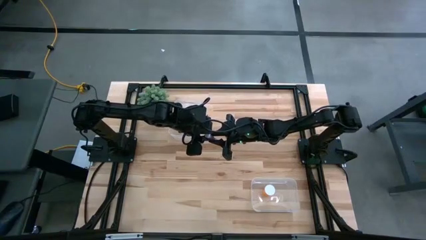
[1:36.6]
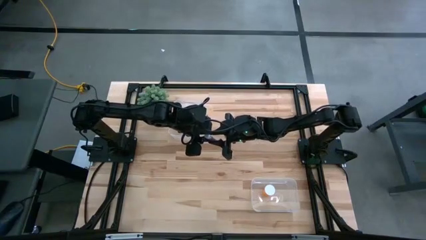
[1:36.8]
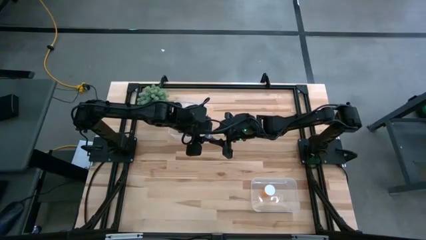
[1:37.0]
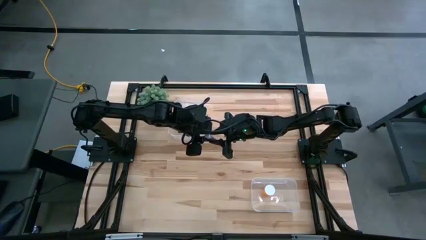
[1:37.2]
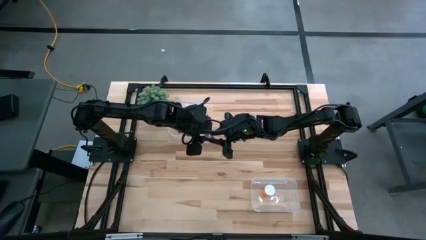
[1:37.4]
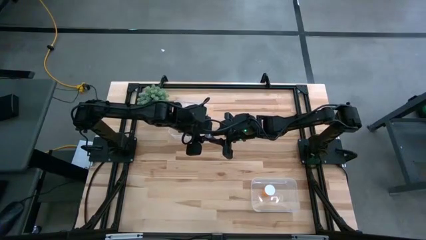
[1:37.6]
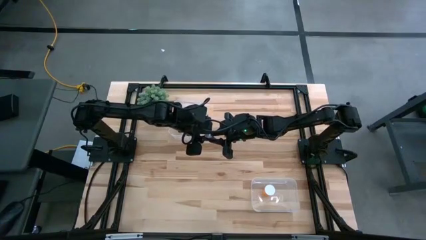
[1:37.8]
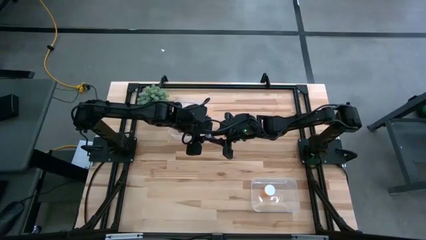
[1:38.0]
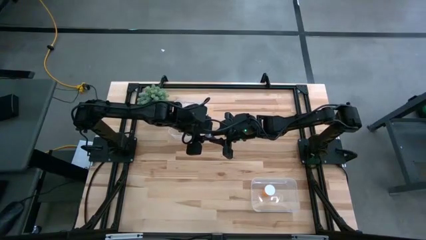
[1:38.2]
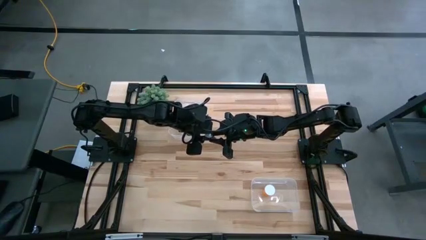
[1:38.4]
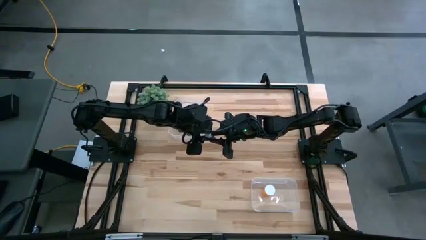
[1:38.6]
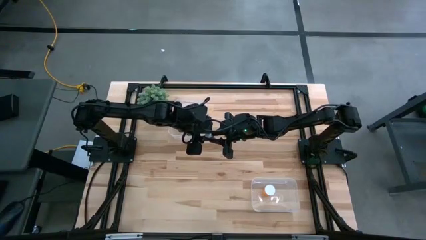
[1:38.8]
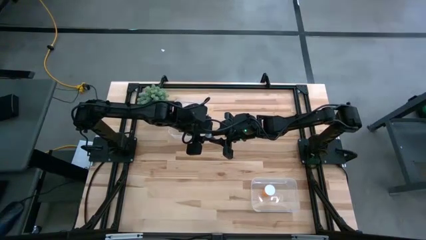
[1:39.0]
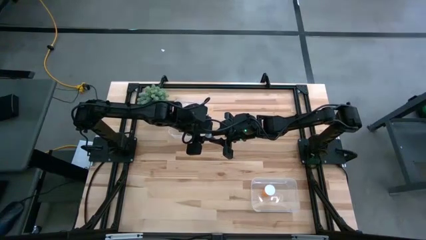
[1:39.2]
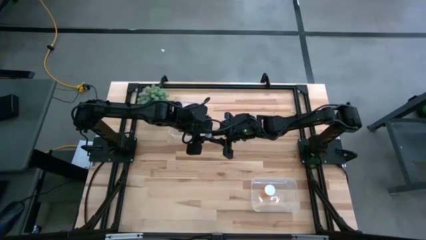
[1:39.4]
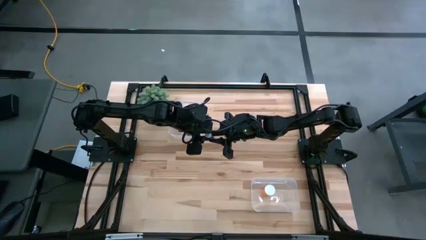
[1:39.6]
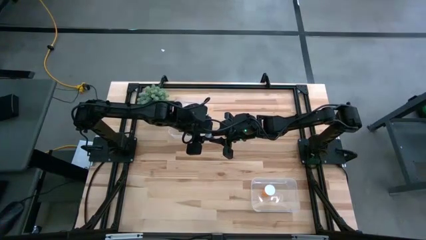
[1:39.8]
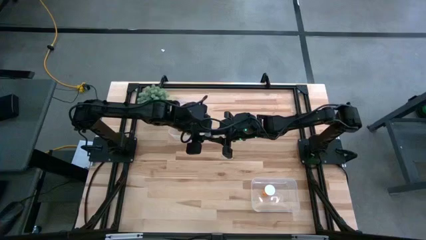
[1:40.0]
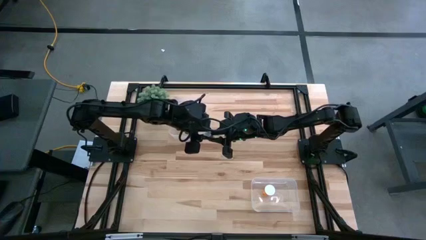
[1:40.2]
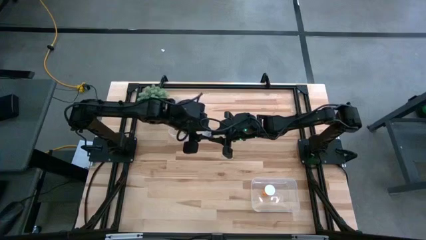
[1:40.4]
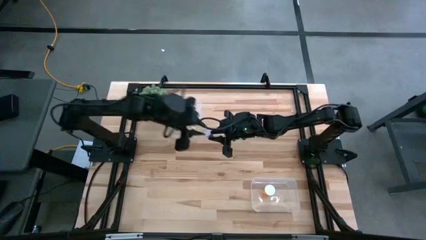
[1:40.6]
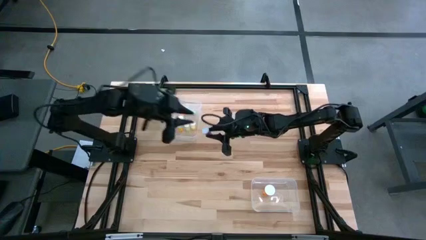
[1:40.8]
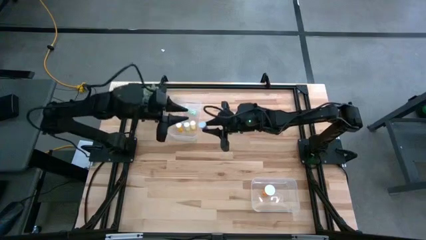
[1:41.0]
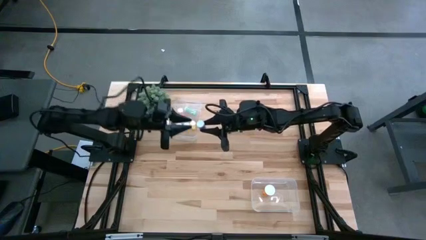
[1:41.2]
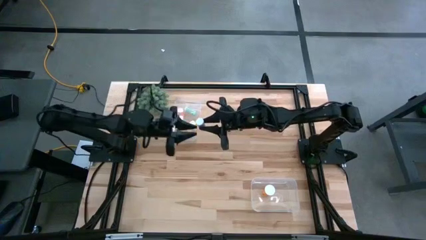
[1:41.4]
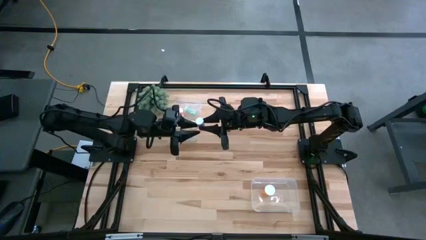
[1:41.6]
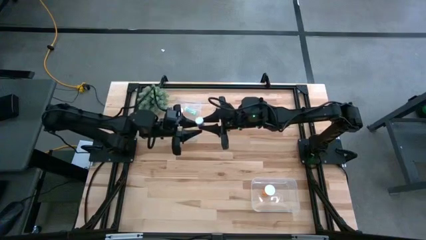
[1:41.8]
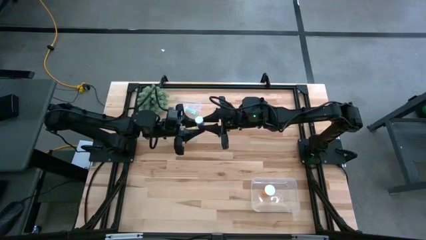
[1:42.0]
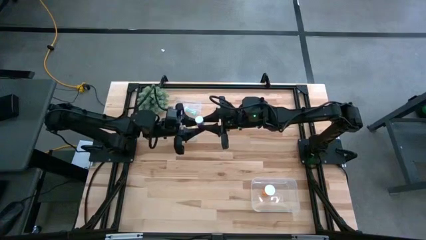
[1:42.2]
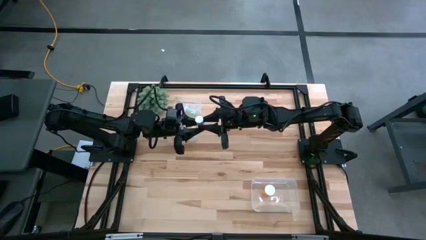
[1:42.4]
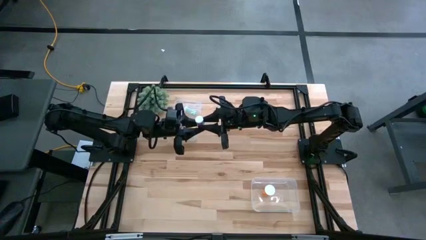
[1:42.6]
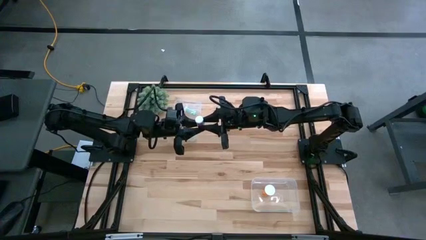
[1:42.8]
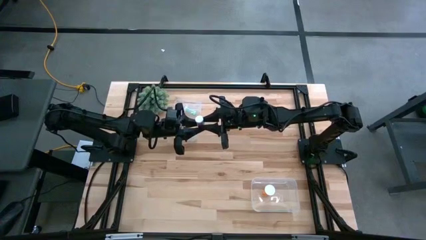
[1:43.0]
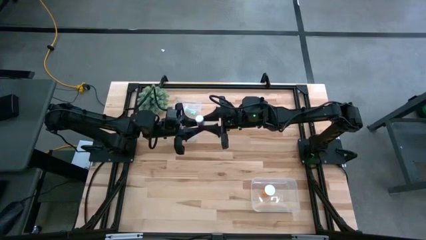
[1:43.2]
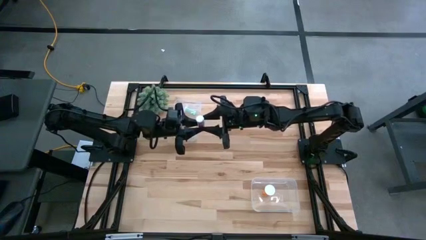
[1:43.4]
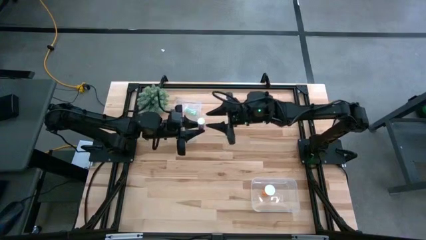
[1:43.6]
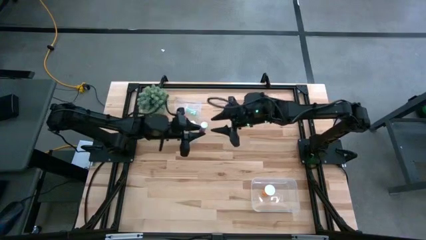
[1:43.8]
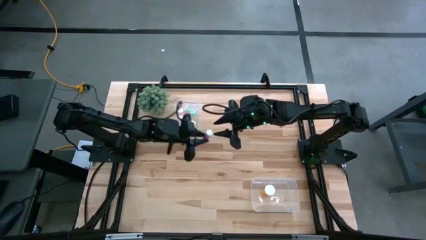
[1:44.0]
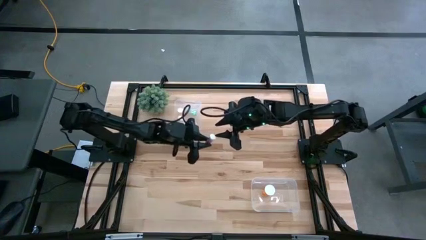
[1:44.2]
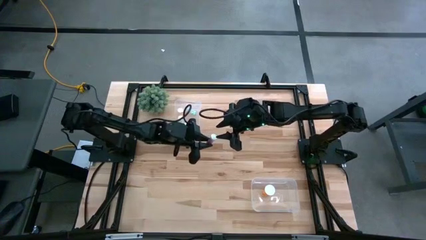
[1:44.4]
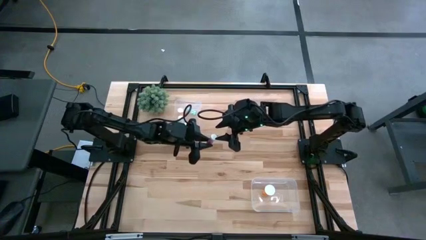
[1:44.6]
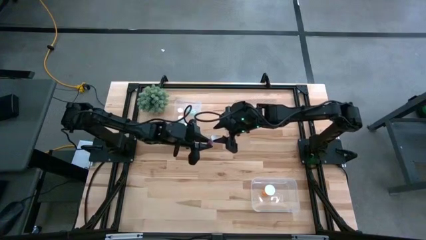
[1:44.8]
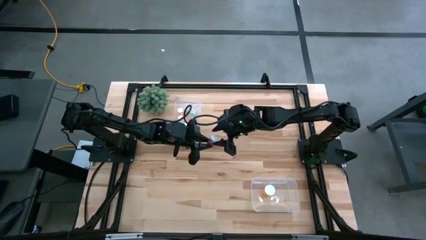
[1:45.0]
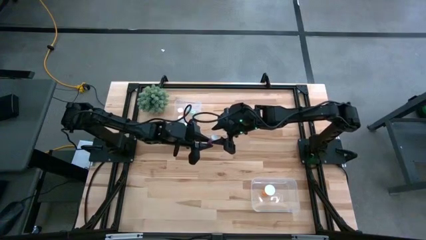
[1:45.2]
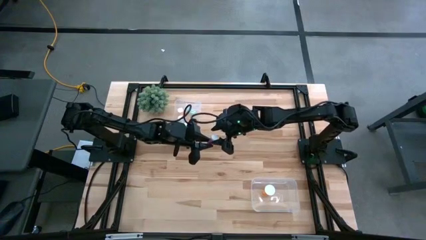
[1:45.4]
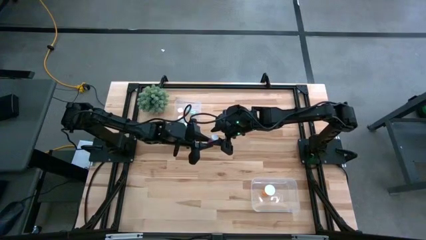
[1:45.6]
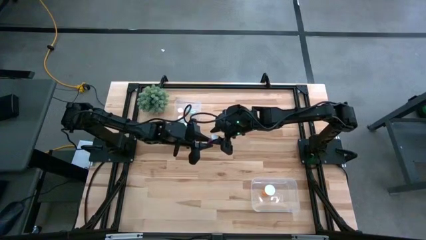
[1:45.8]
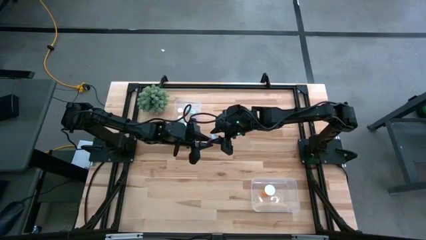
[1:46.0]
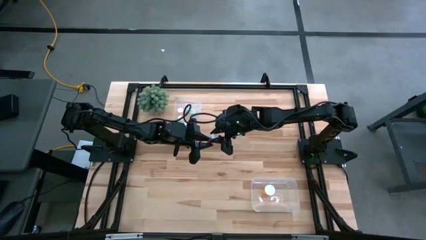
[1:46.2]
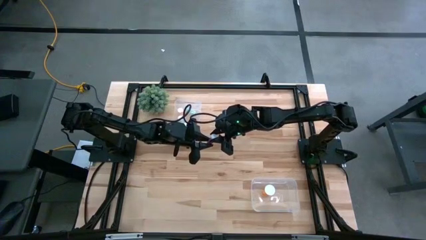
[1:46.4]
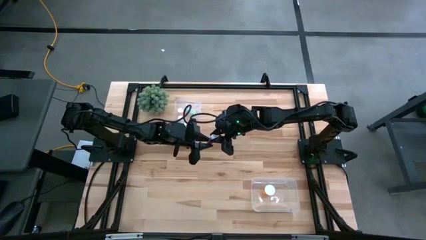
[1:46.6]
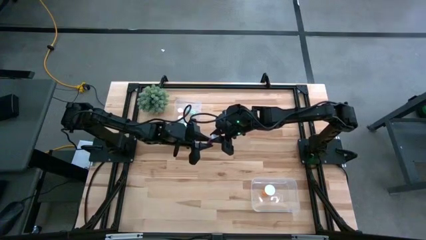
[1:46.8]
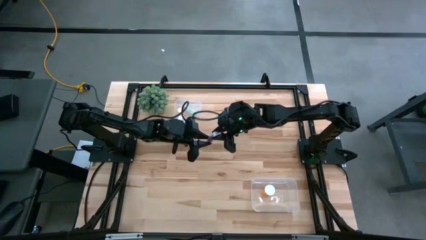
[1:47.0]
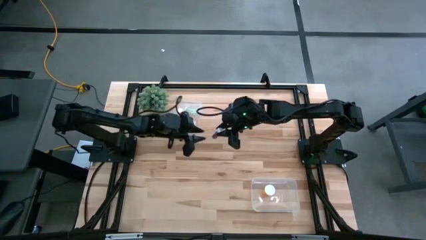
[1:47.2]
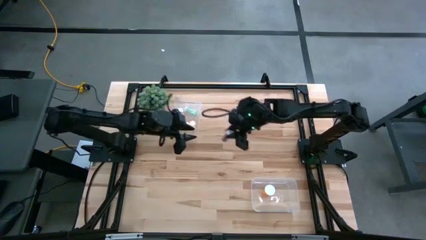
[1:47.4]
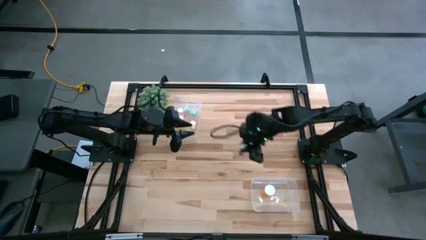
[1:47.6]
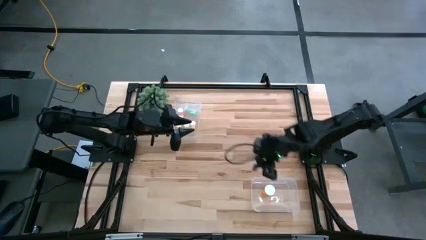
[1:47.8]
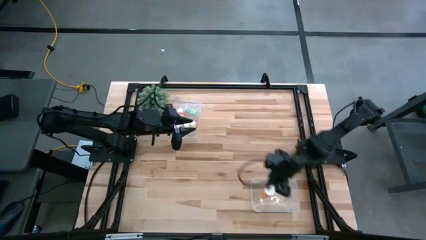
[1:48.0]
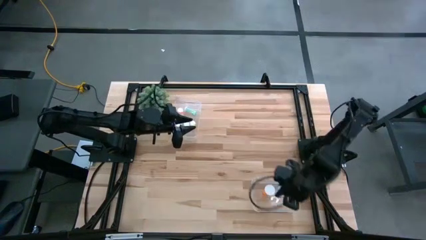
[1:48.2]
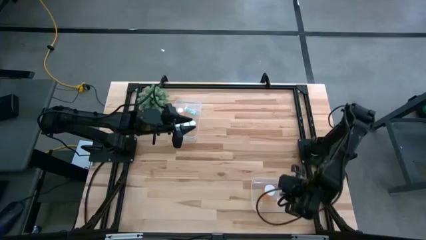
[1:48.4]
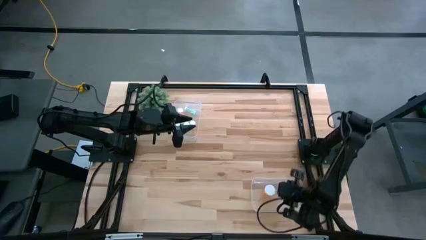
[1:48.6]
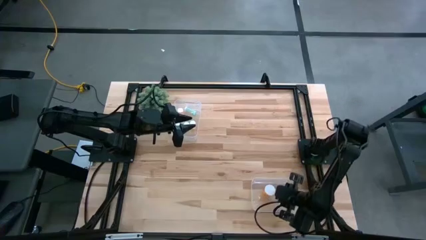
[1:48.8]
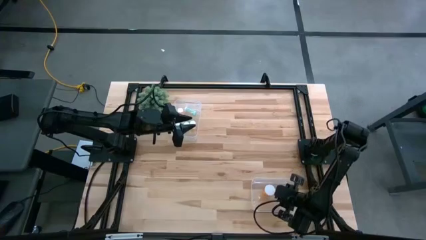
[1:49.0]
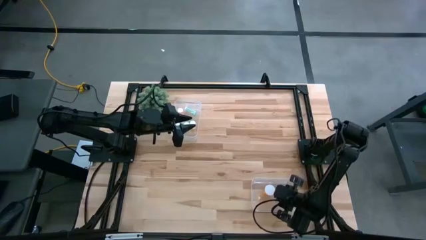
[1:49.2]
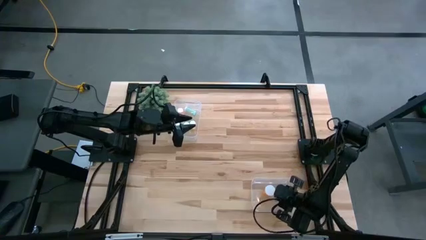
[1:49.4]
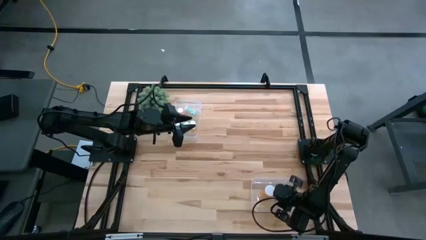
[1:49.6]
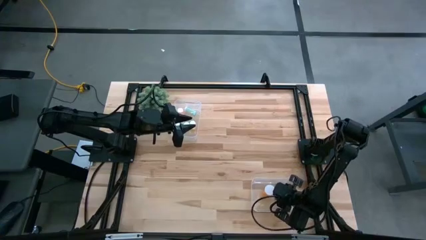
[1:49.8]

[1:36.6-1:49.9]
Task: Pick and place medicine bottles into bin by pill shape (circle, oval)
Put the blue capsule bottle into the bottom transparent bin

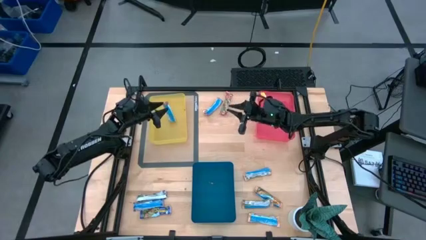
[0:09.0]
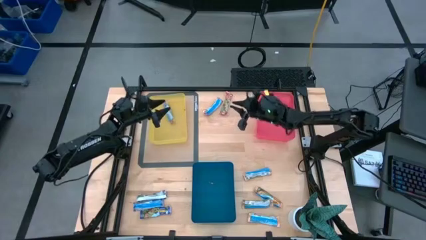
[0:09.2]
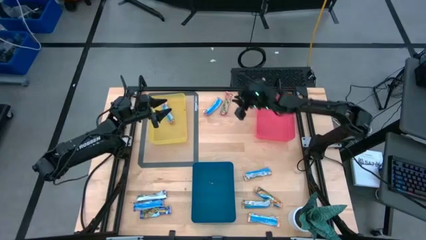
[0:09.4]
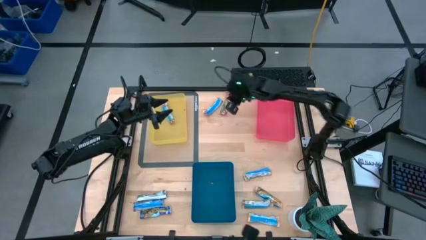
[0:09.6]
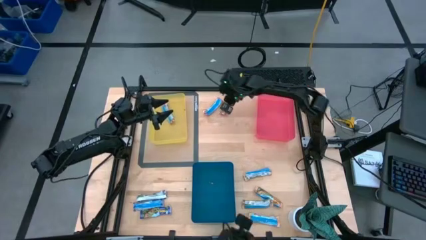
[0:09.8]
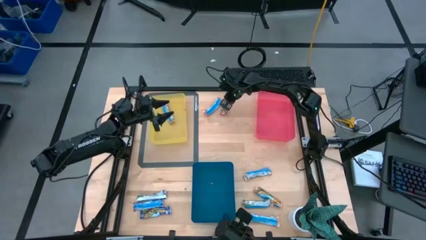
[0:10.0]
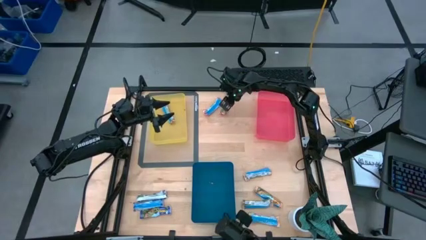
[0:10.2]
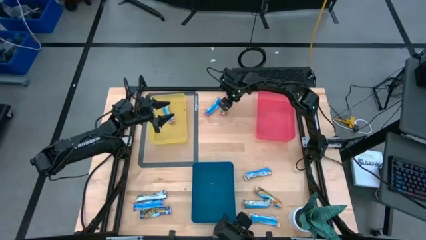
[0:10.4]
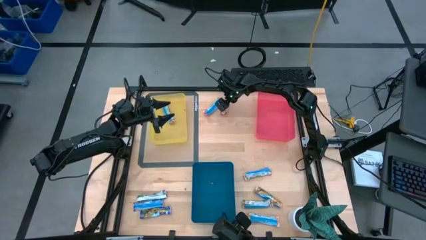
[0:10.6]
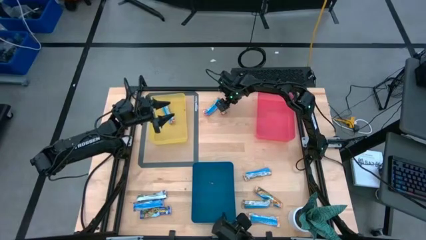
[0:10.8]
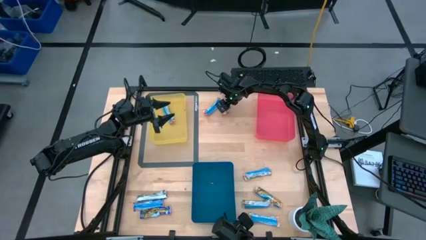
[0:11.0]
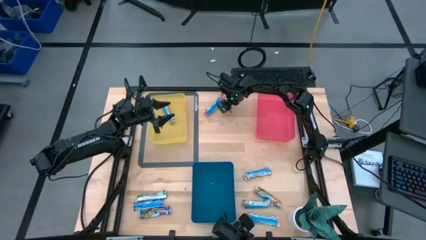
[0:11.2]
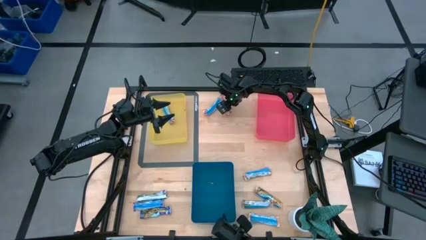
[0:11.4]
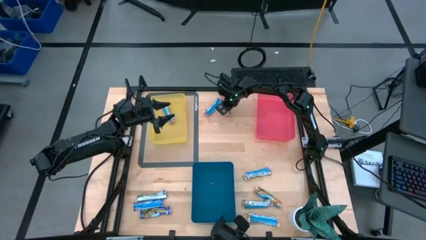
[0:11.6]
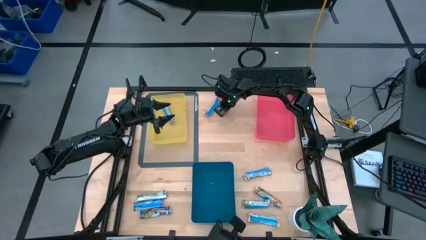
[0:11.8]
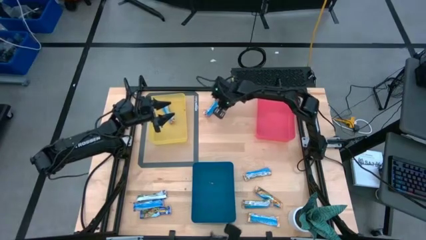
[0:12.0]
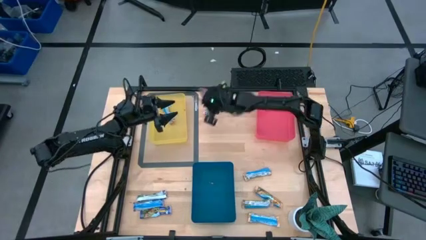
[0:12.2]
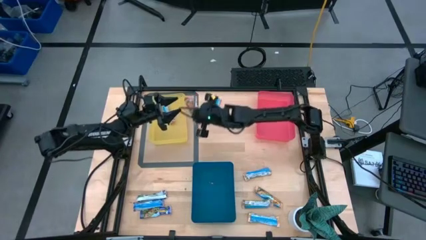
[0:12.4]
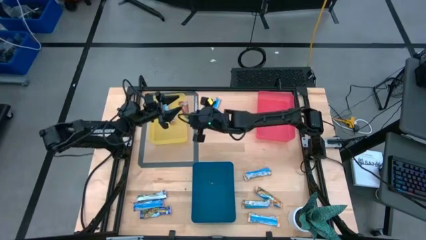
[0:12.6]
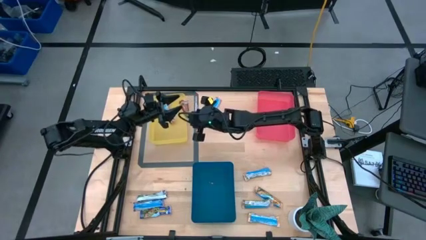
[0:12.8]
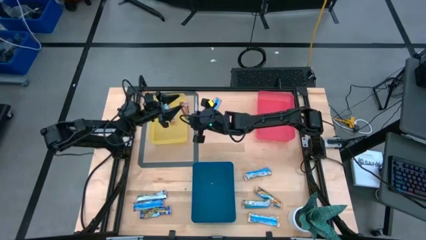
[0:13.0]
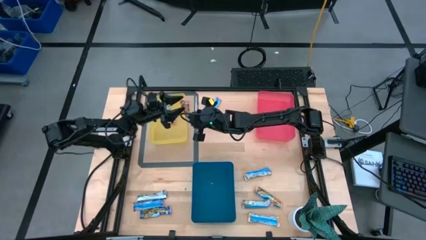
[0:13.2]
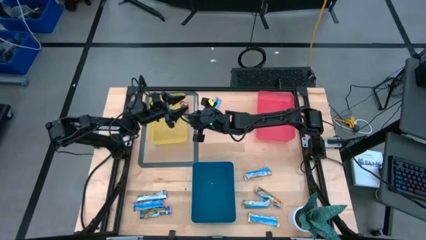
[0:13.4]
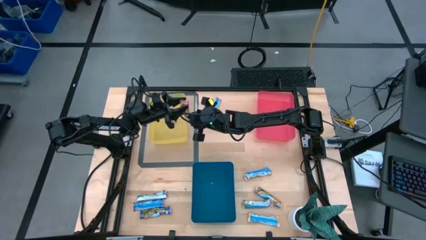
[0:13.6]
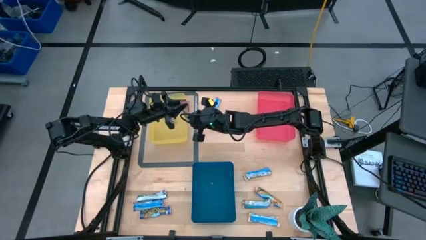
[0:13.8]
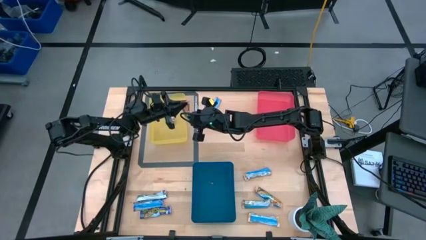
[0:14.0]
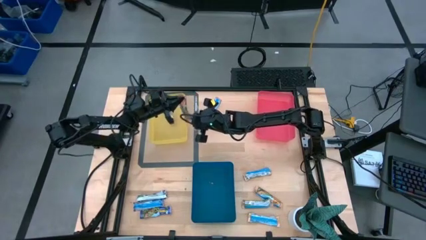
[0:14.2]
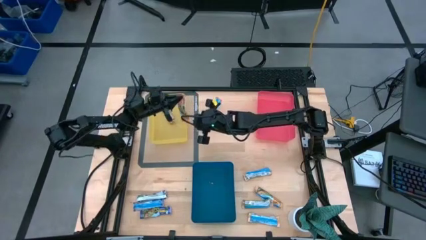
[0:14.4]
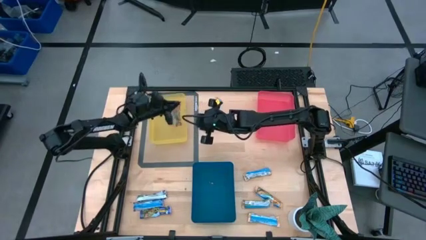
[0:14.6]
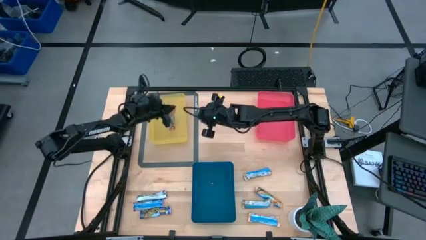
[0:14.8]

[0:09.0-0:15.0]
Task: Pick and place Granola Bars by type
Put the red granola bar into the yellow bin
